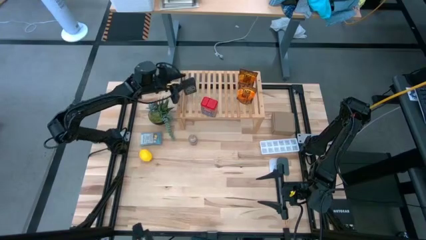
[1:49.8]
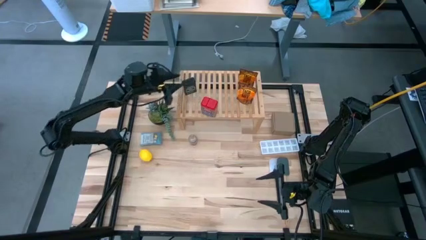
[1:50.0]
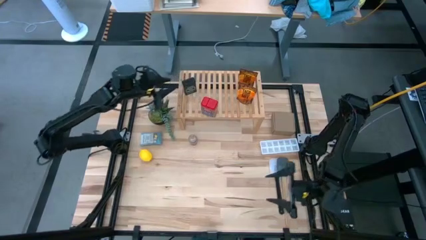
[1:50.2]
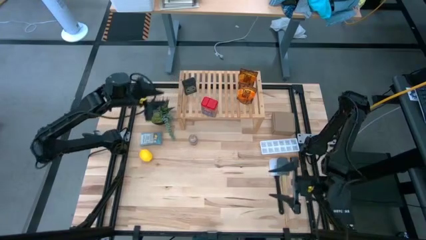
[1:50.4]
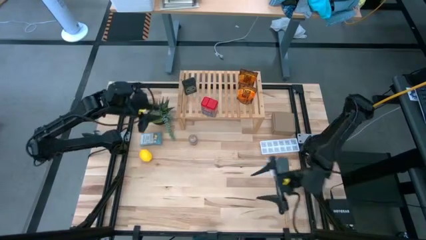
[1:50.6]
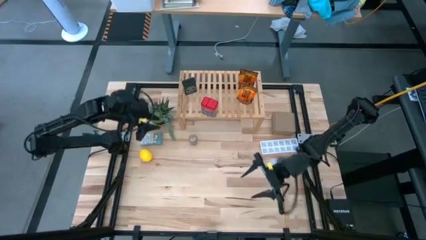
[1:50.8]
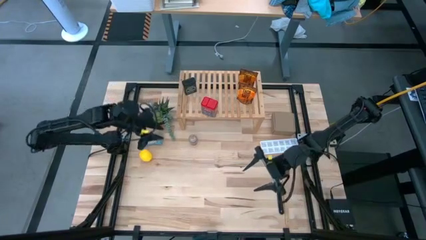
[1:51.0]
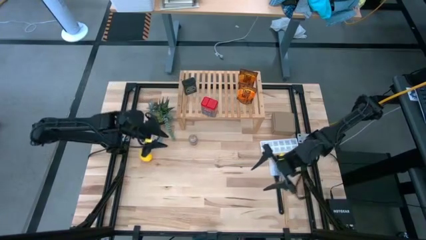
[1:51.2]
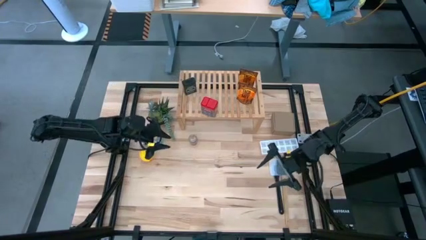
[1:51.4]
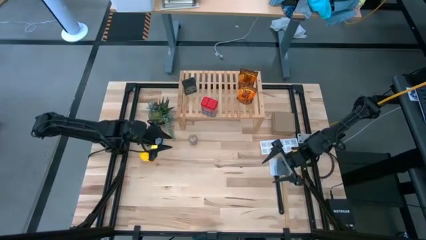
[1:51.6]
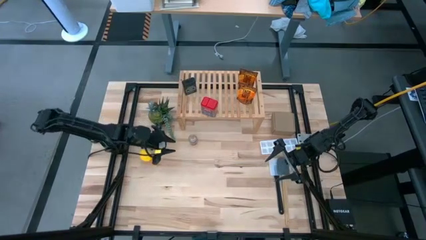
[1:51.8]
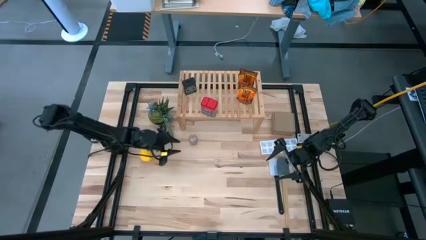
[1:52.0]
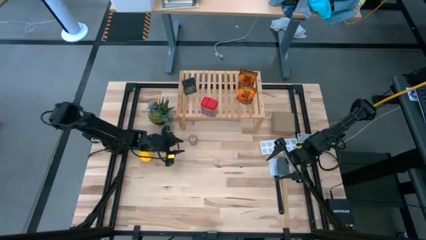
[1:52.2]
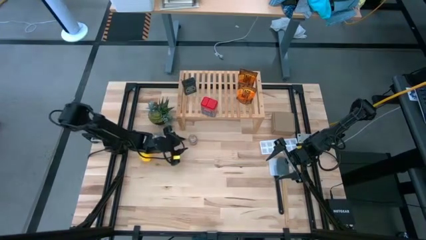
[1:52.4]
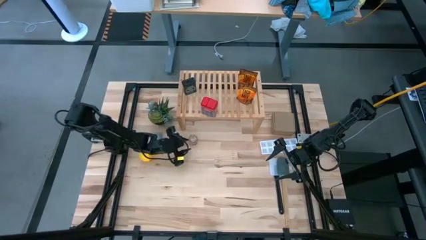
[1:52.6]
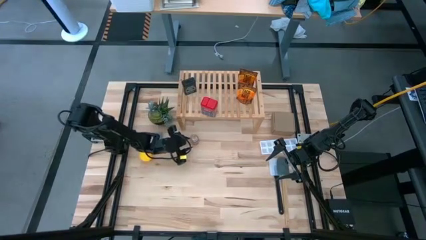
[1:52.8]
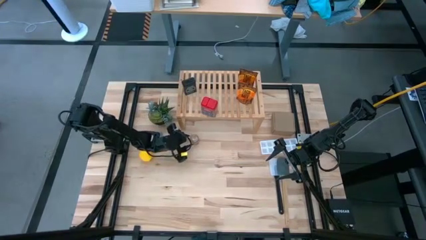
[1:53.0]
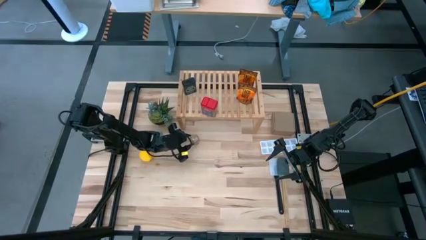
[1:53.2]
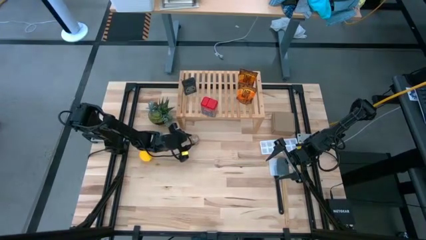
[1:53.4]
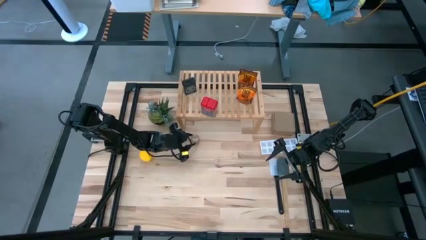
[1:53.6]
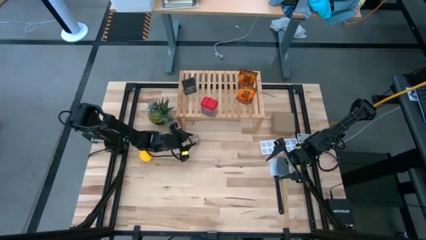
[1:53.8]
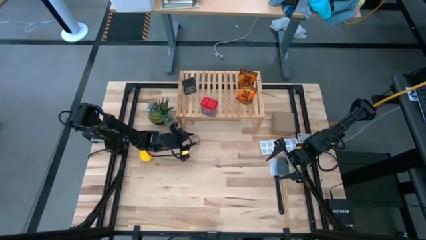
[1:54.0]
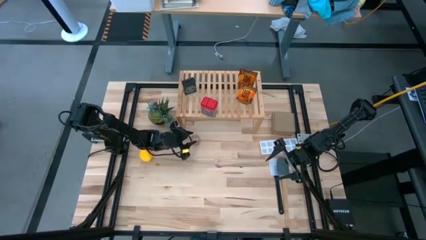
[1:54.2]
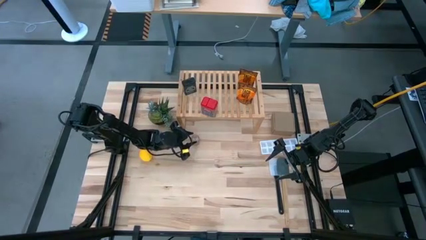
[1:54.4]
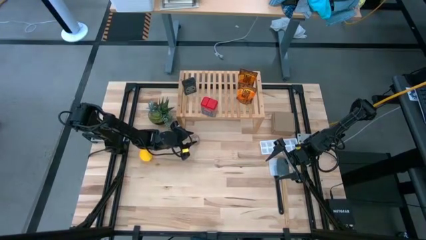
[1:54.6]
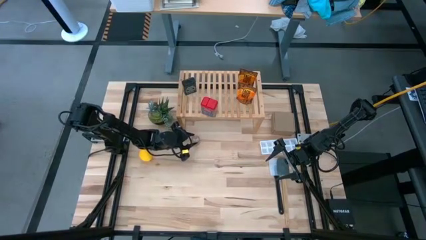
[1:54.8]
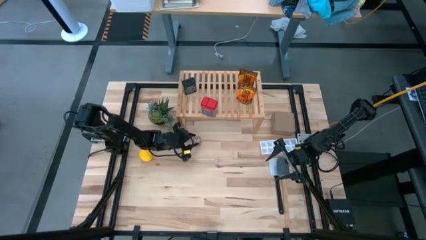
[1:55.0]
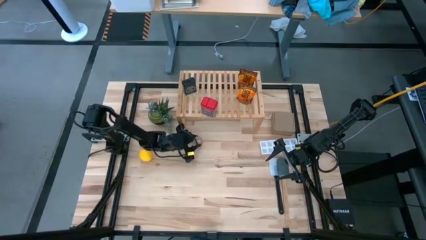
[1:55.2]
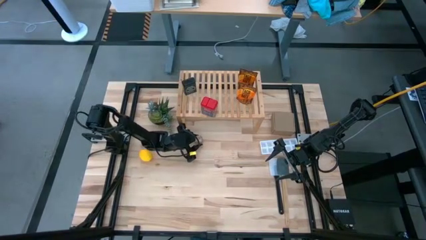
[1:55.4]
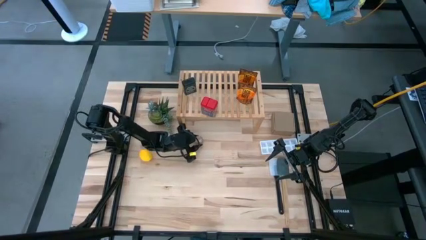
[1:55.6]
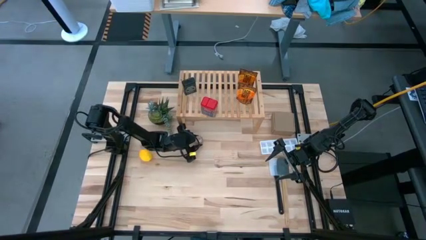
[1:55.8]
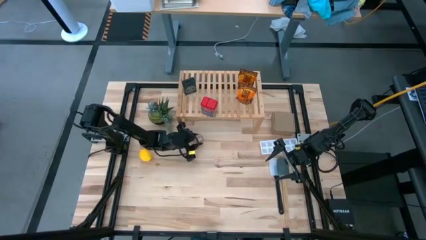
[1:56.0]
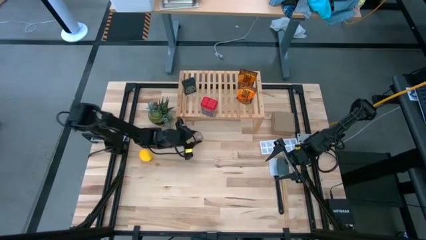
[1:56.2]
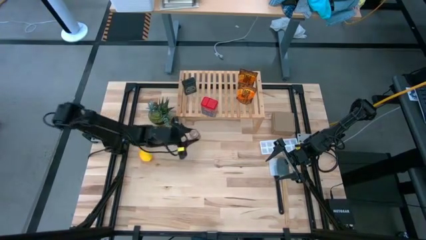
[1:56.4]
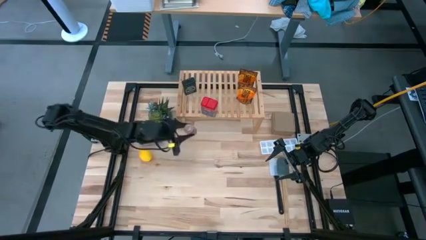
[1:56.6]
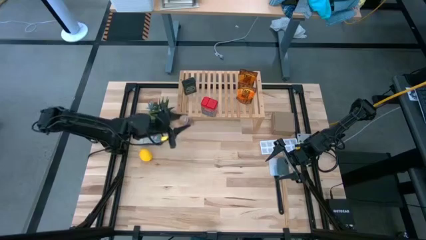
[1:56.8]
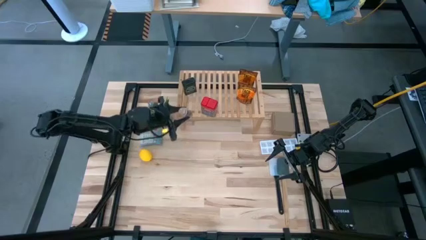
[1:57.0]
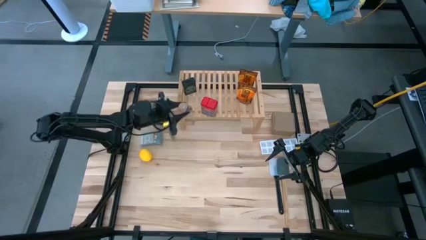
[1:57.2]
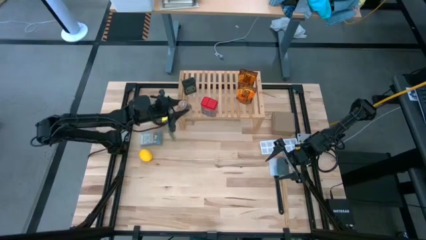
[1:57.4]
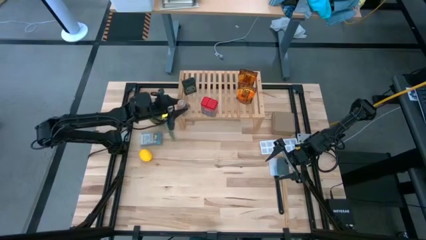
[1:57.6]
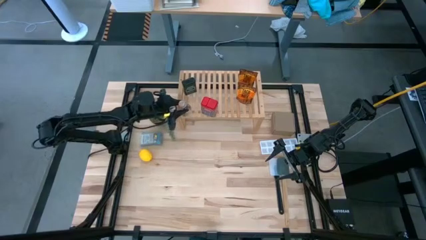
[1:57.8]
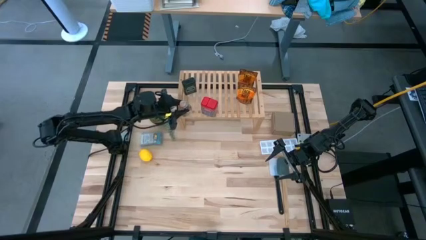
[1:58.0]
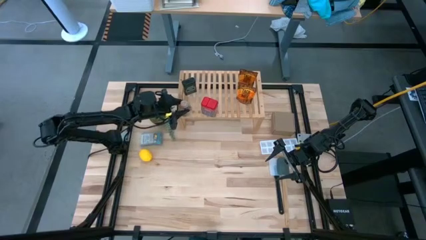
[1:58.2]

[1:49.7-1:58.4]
Task: Shelf spices
Put the brown seasoning bottle on the shelf

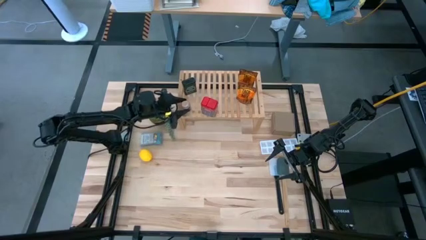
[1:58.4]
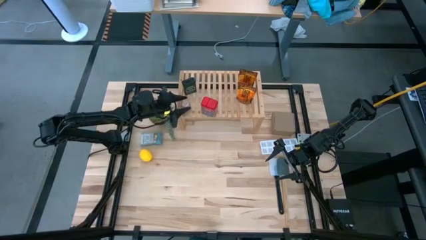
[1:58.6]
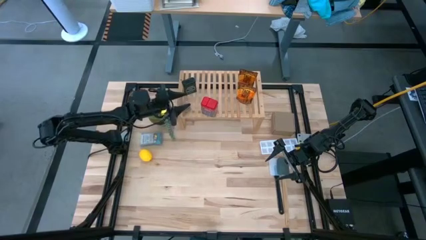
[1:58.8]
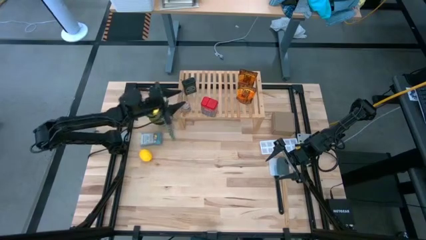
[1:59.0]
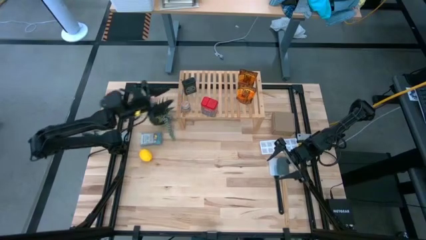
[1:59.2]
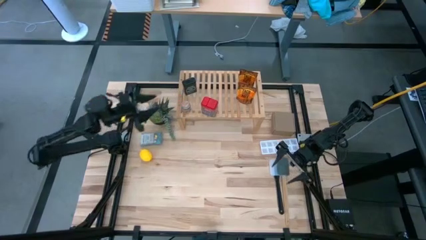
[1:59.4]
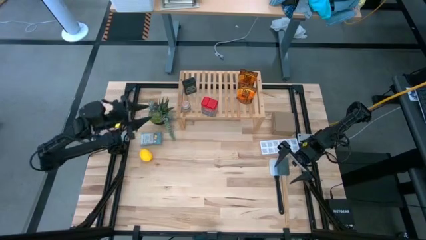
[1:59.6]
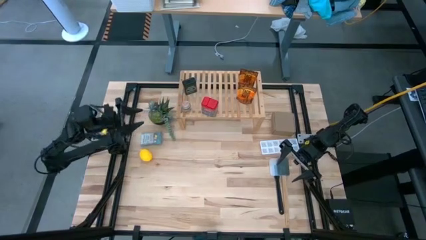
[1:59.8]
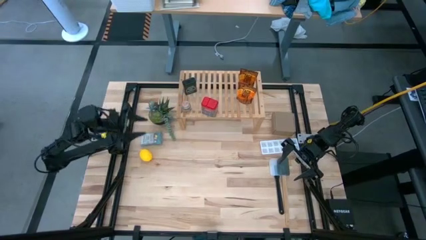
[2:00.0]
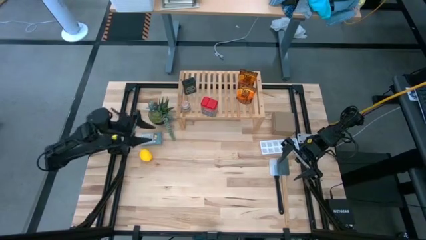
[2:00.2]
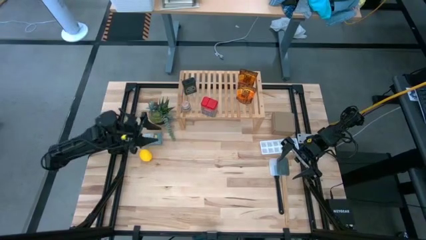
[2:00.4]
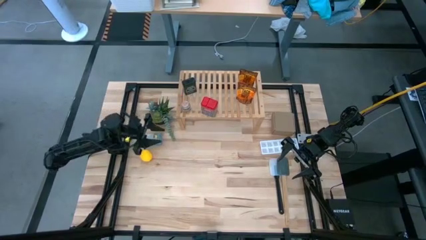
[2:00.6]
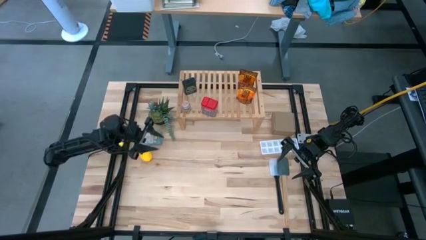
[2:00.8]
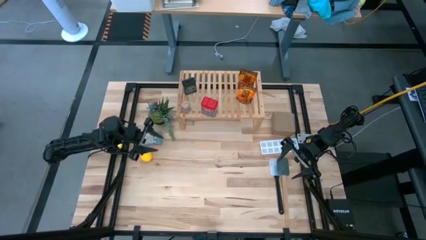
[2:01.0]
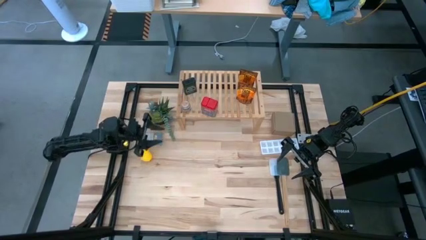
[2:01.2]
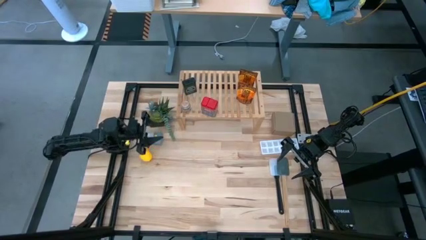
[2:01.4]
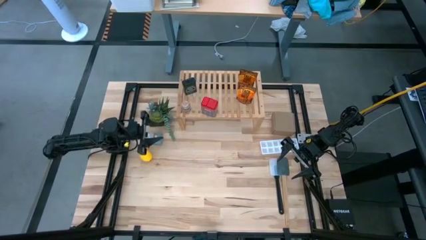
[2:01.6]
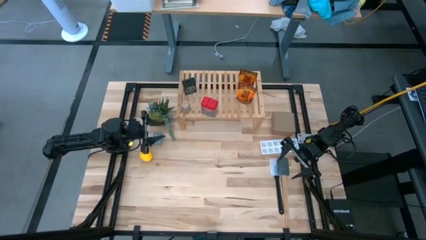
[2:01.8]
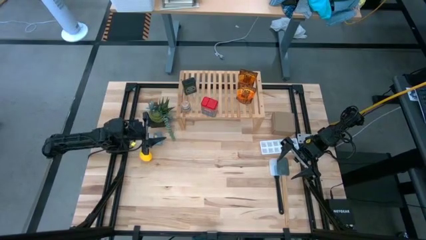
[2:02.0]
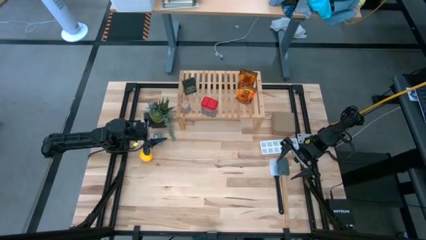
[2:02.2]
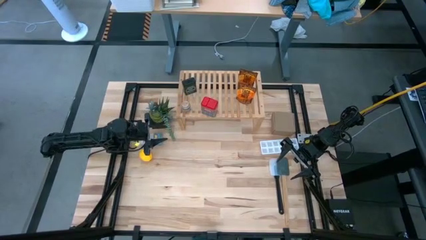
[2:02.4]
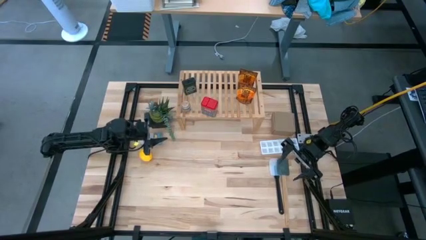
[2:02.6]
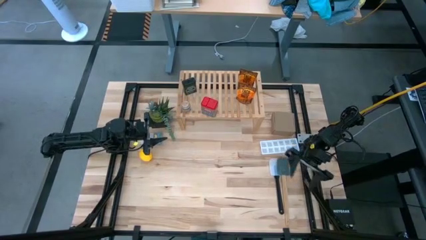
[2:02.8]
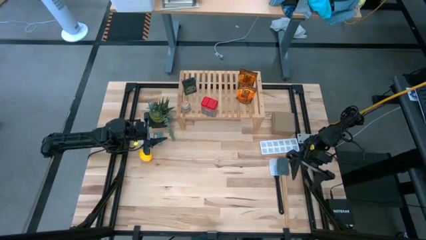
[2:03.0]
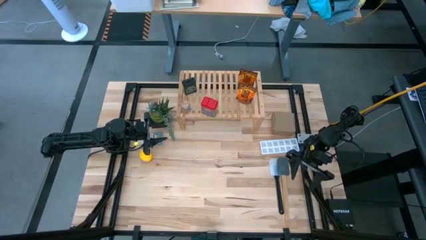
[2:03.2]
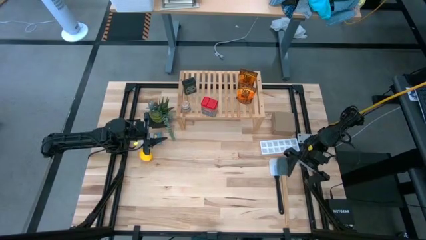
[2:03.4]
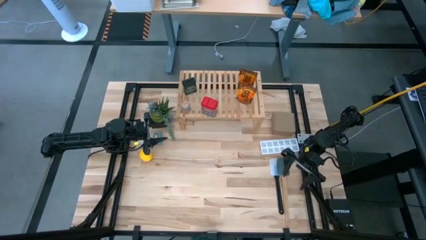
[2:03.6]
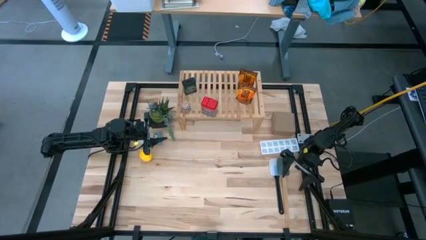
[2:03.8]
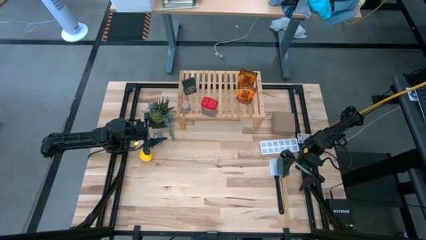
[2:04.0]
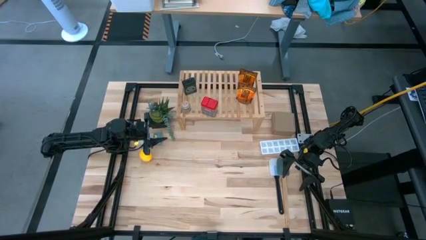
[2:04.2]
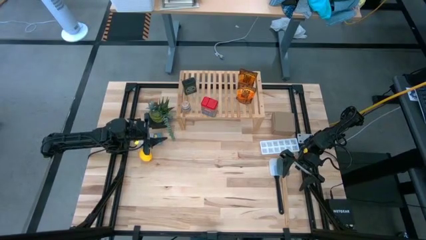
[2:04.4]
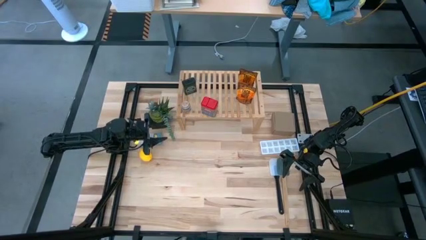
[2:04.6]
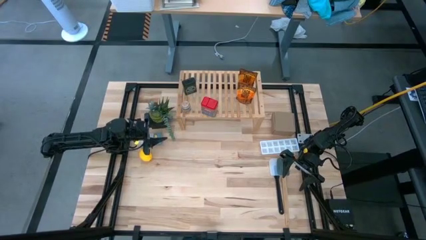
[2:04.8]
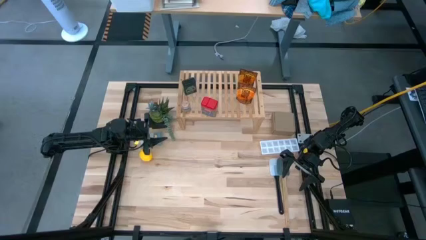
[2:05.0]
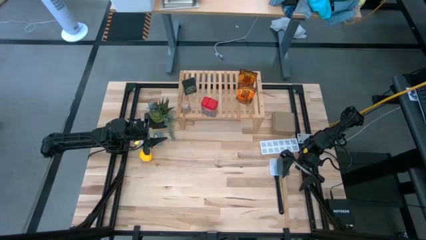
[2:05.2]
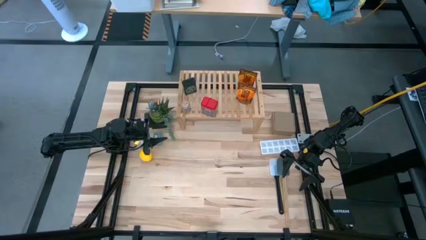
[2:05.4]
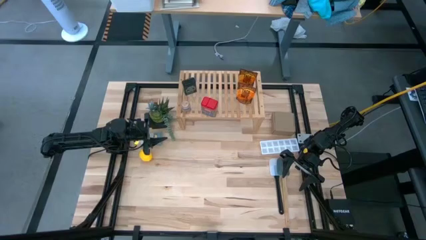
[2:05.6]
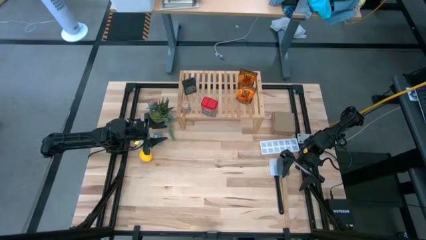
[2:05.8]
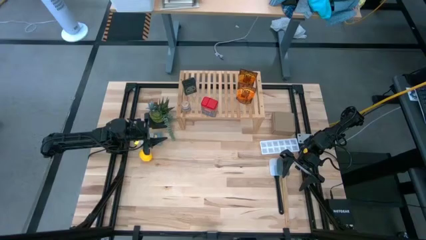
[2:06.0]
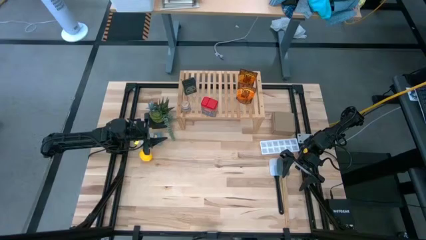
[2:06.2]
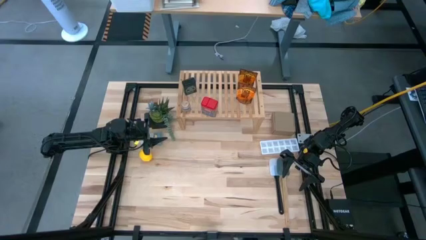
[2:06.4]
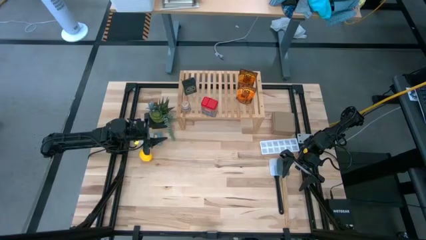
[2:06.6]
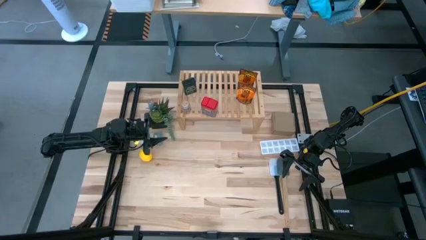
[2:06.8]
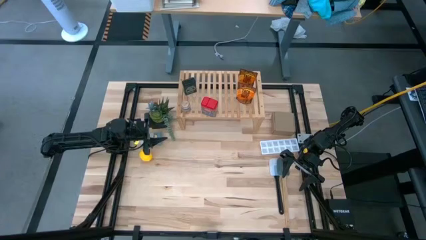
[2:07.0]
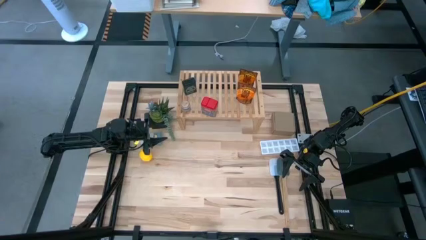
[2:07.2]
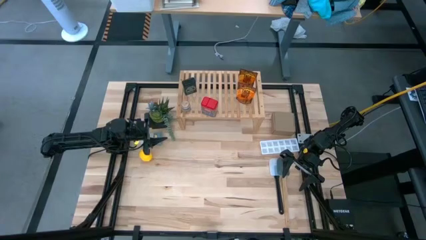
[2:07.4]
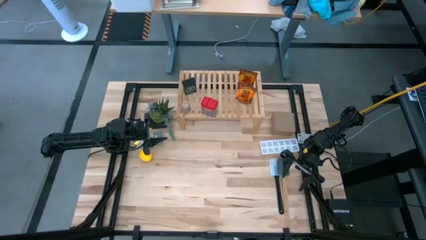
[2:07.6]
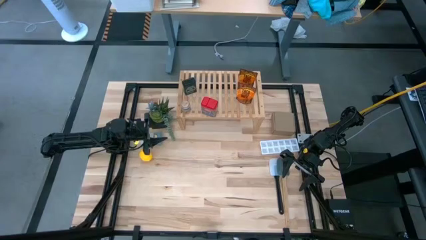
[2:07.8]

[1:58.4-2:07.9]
Return to Home Position
